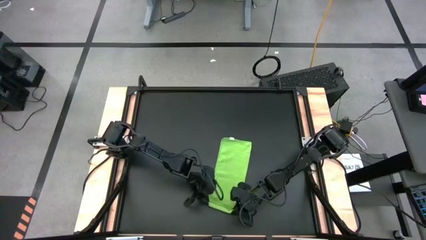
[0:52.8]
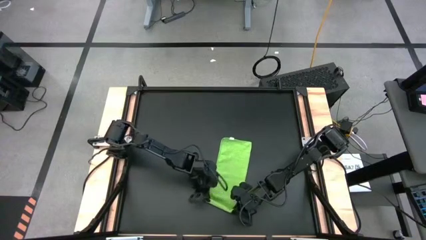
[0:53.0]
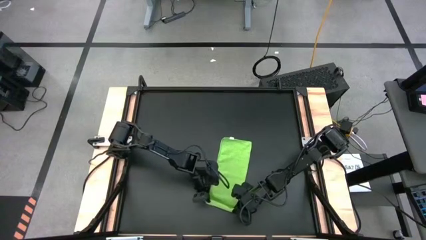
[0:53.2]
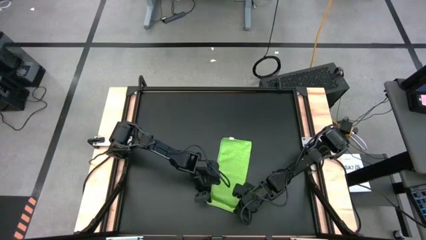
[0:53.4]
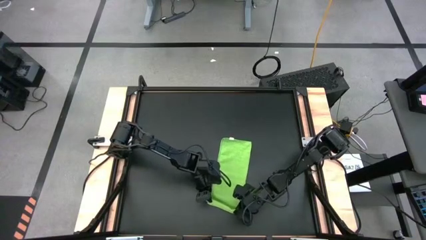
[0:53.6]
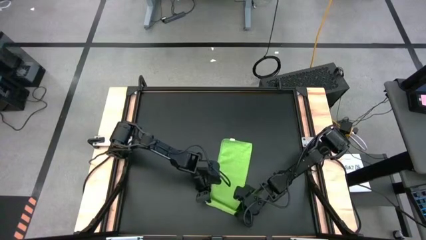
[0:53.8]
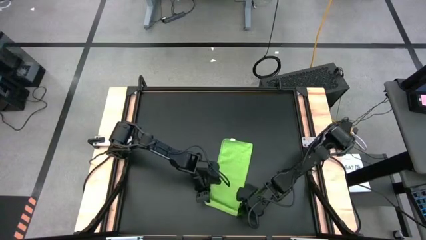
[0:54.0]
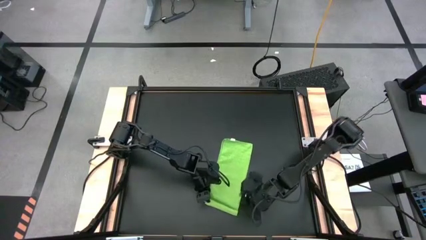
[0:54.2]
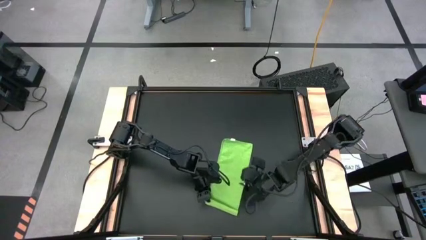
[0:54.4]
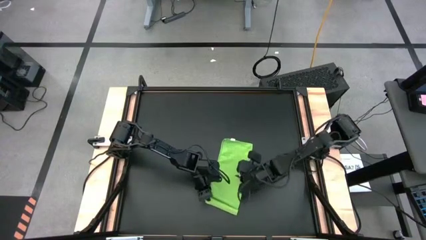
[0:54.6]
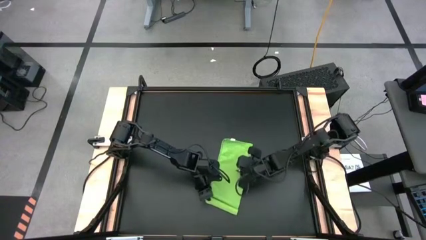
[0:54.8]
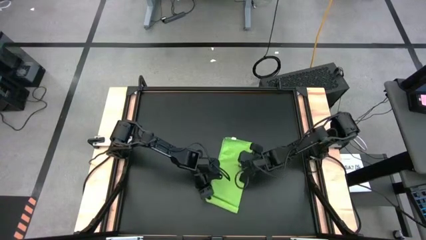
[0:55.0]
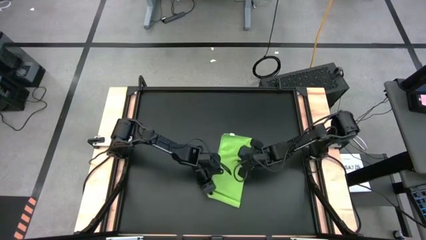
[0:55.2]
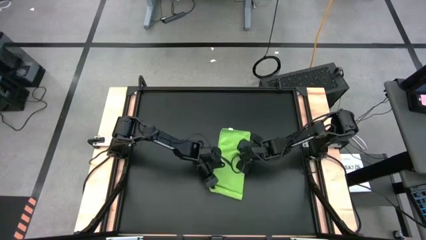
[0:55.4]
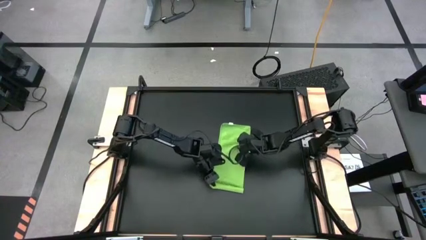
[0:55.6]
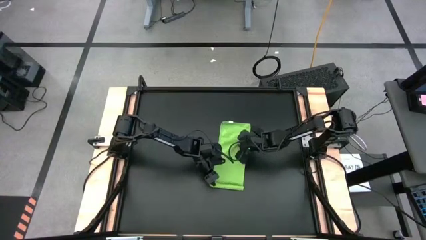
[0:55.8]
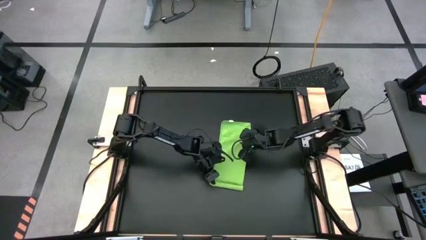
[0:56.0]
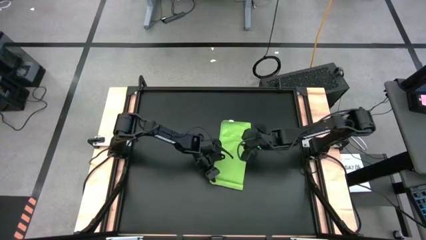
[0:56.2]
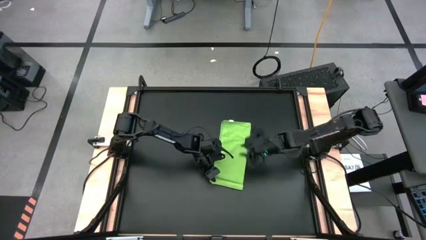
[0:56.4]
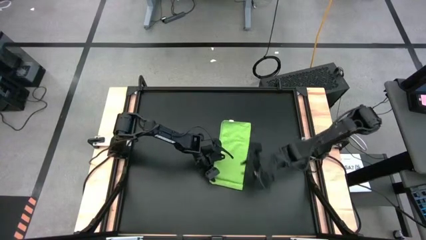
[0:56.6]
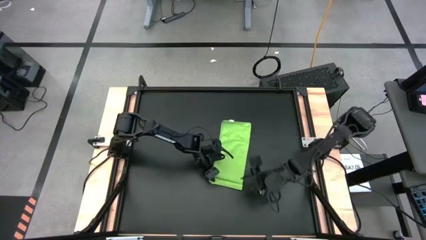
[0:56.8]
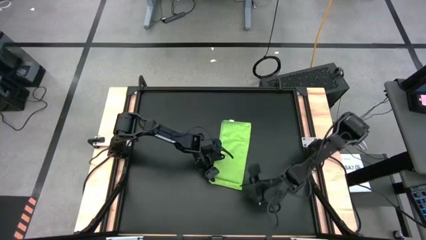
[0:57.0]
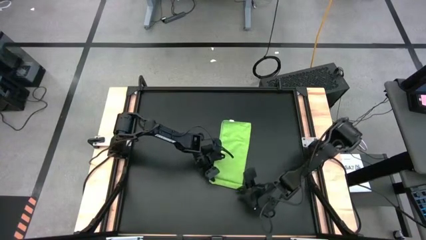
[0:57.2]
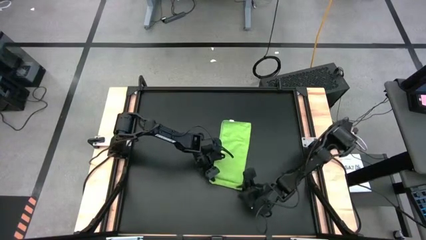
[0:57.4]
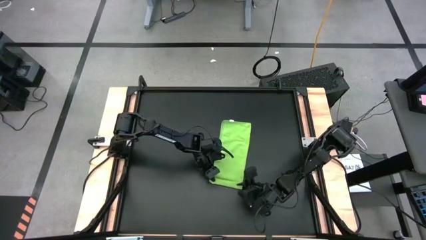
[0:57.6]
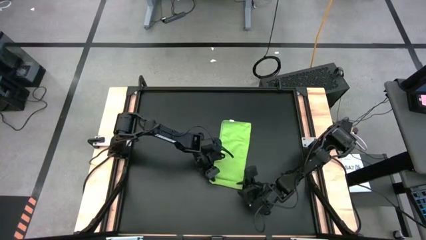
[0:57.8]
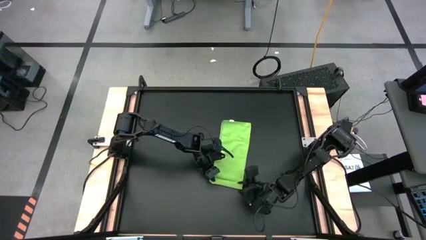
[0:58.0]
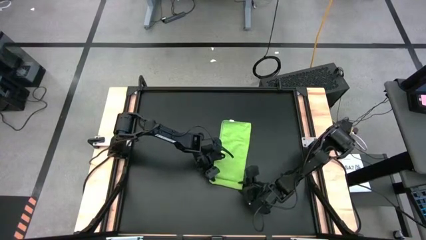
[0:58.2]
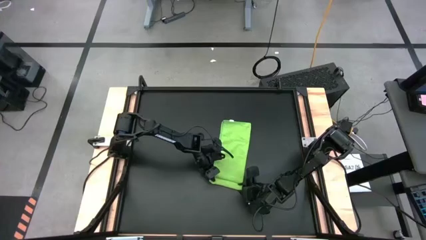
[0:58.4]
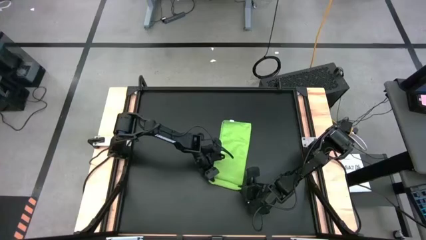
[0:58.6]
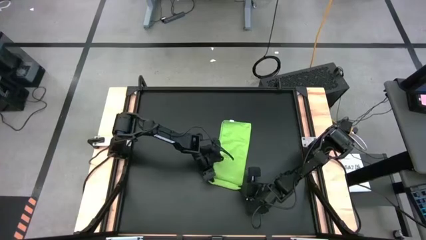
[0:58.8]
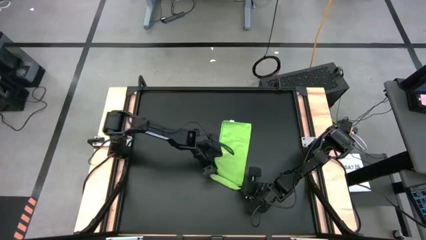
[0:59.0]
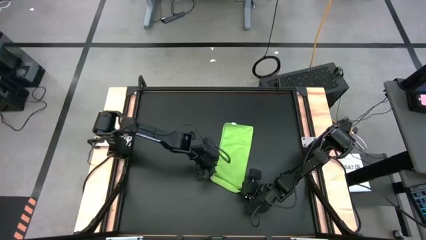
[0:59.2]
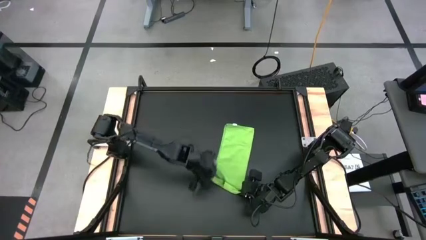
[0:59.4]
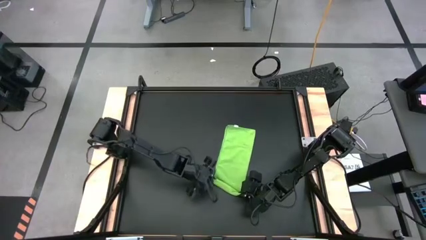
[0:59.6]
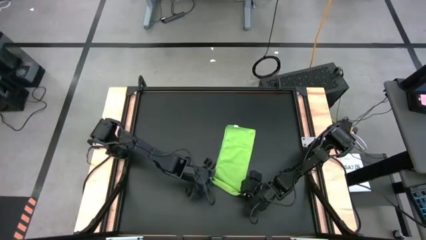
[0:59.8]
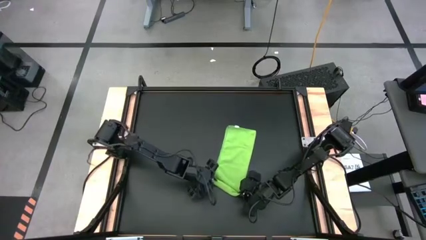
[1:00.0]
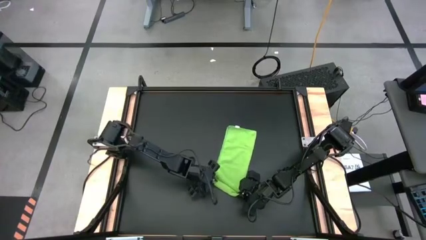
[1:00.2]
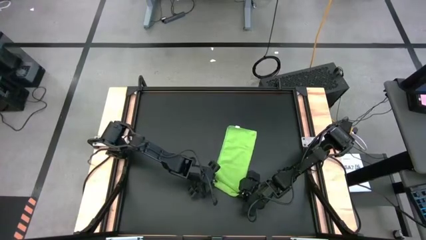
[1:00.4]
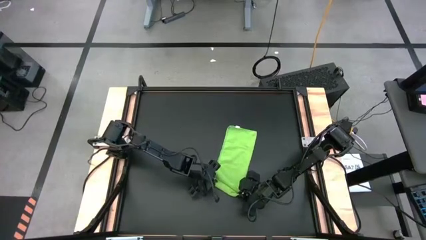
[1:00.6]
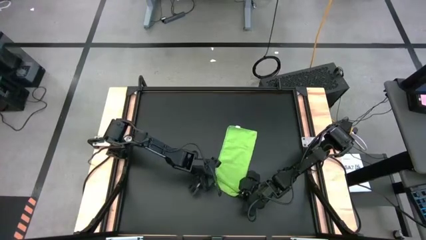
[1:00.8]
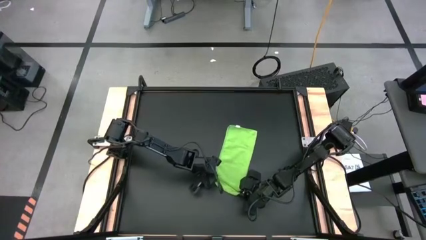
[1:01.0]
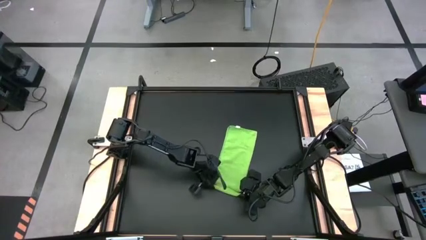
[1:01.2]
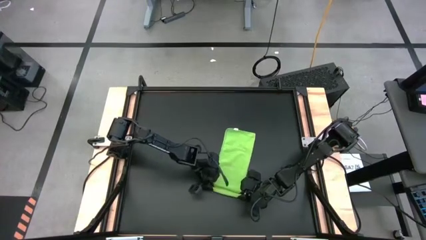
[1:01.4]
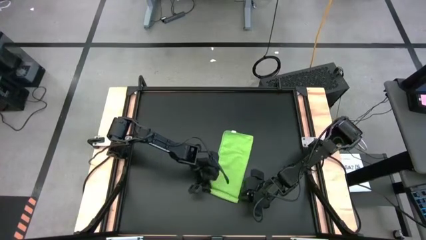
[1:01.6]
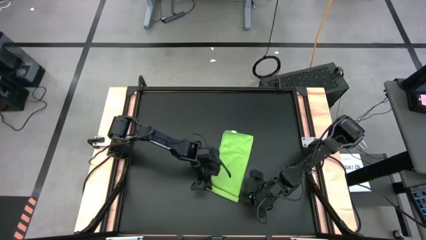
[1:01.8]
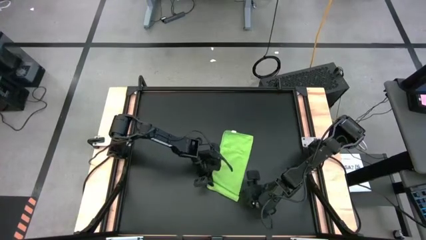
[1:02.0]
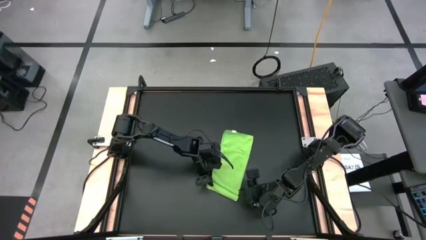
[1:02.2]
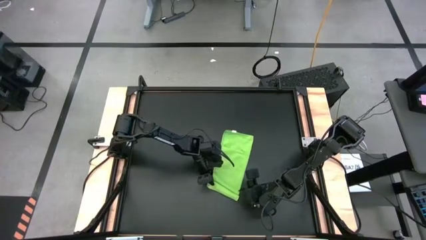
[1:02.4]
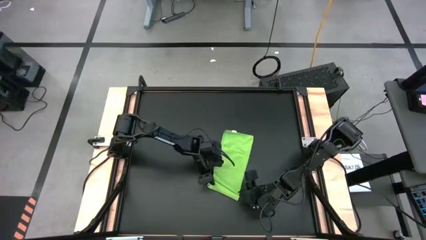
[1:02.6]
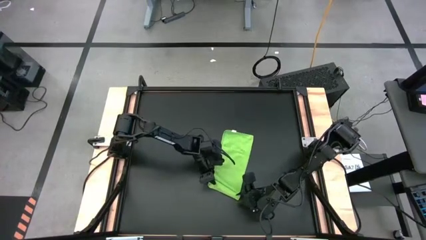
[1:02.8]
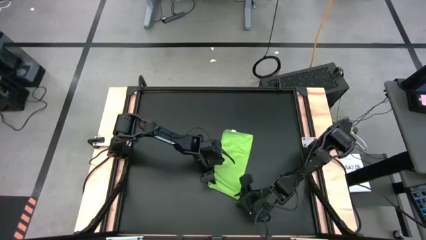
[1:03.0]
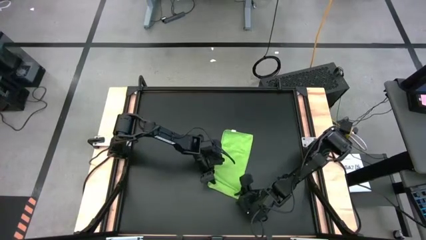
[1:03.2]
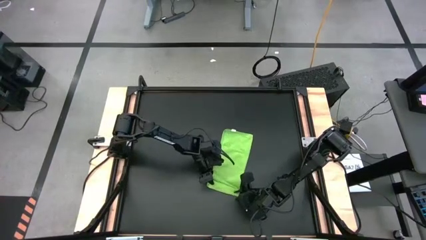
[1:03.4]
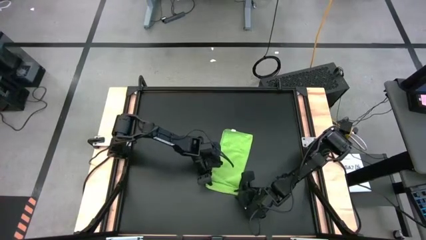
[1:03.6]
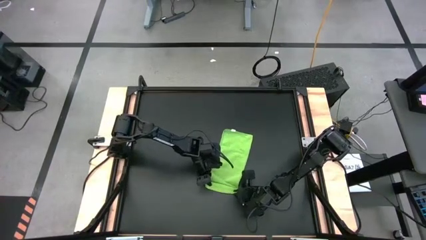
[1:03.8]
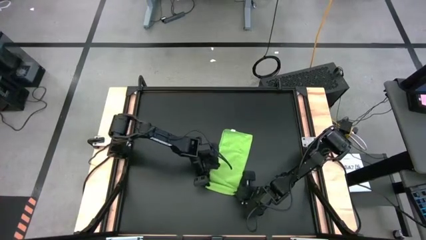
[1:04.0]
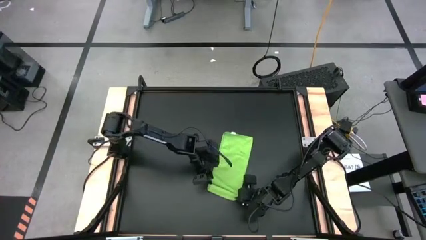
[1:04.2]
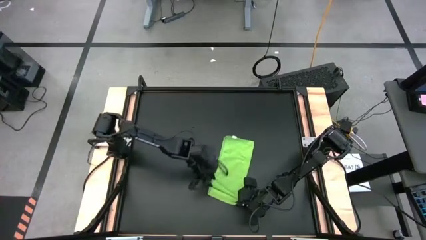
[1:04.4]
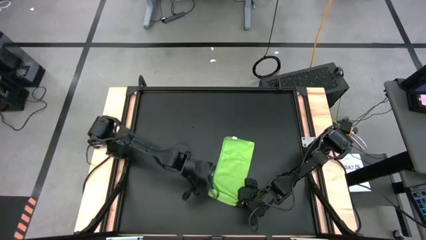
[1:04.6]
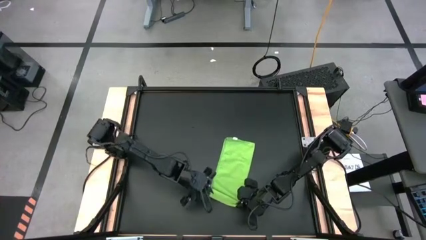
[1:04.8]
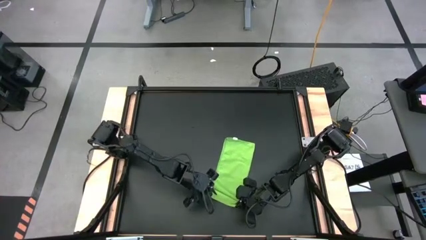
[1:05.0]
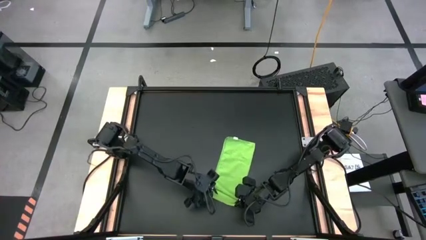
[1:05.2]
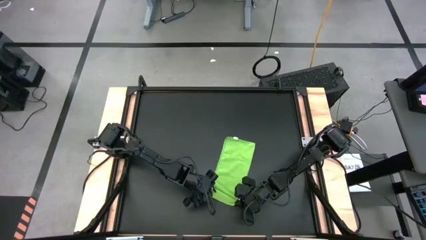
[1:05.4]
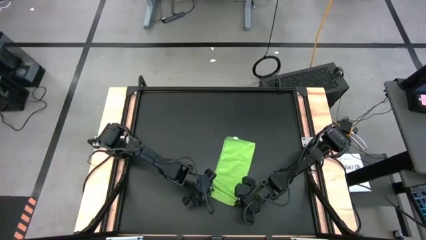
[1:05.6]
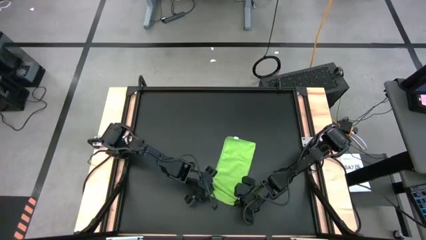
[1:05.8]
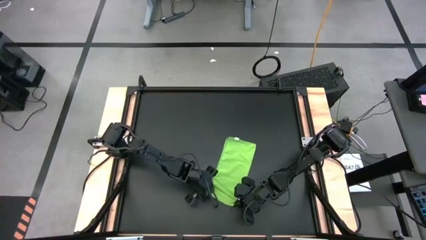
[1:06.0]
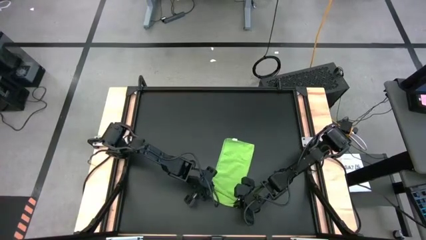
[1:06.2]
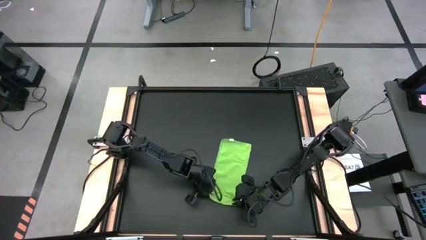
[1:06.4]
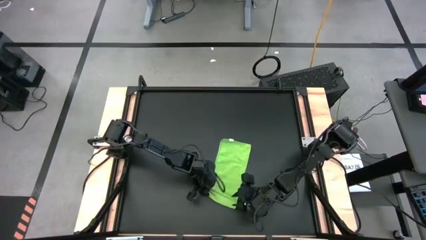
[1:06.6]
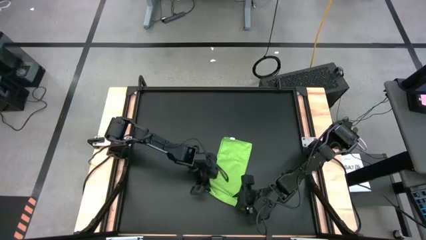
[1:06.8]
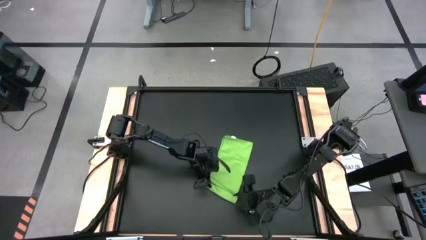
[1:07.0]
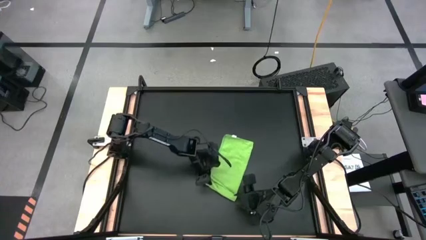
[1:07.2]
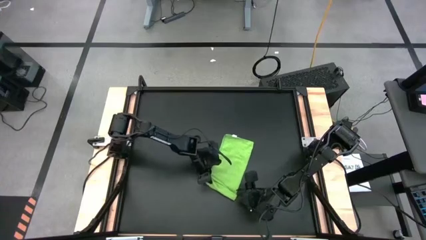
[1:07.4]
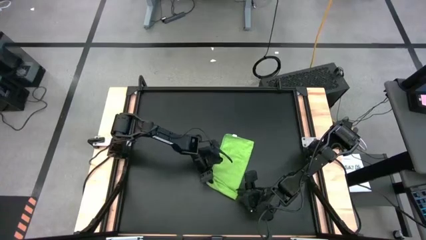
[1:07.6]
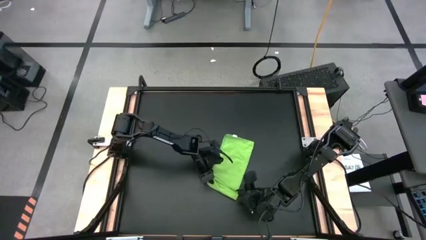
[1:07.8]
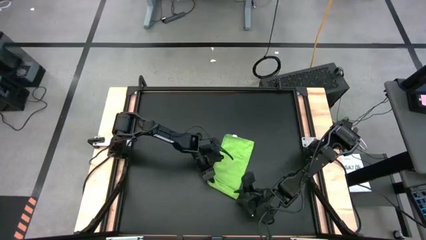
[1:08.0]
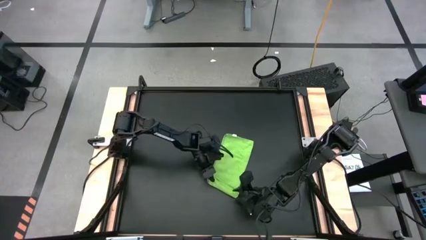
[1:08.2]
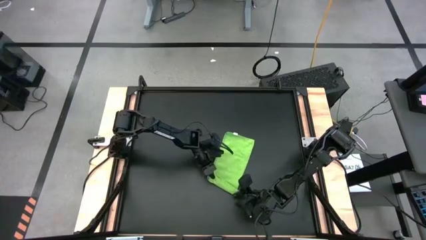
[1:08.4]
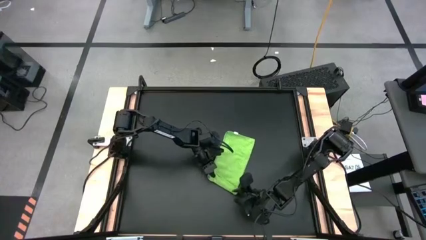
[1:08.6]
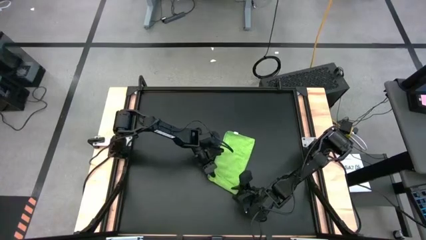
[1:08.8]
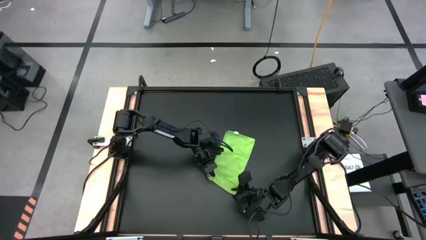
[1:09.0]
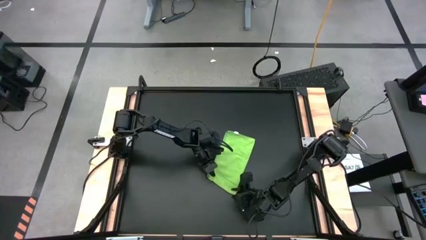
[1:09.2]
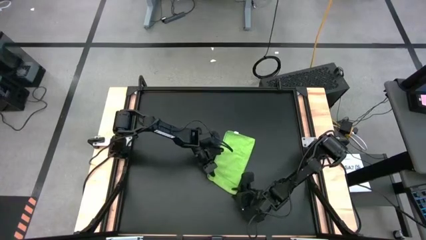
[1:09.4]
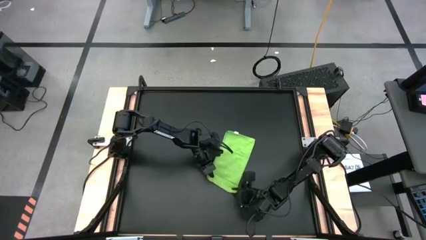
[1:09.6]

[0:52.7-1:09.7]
Task: Roll towel into tight, uniform cylinder
Roll the green towel
